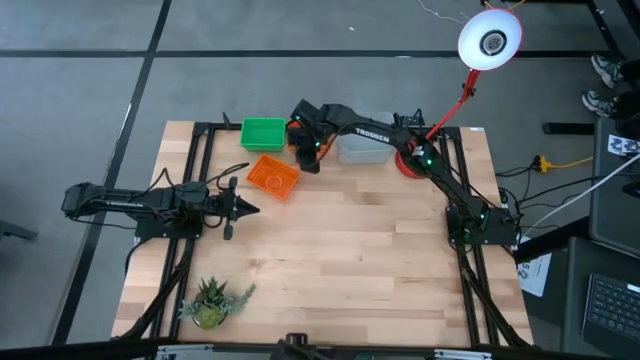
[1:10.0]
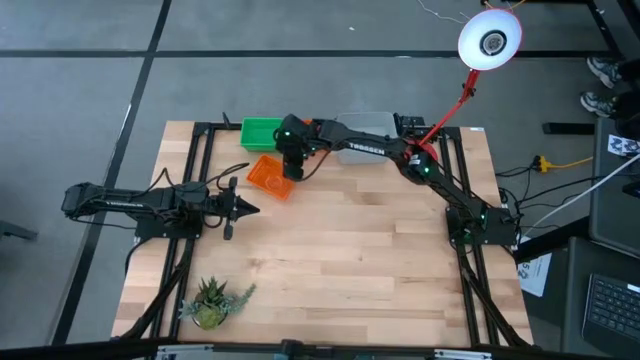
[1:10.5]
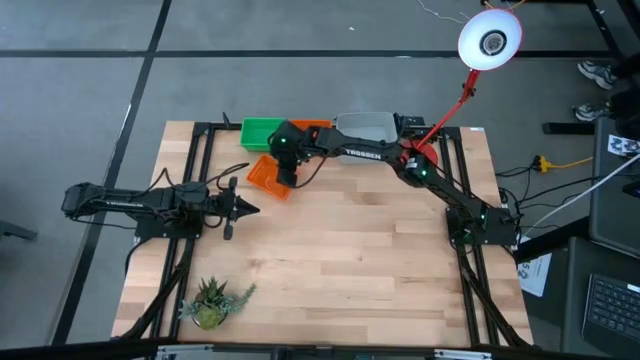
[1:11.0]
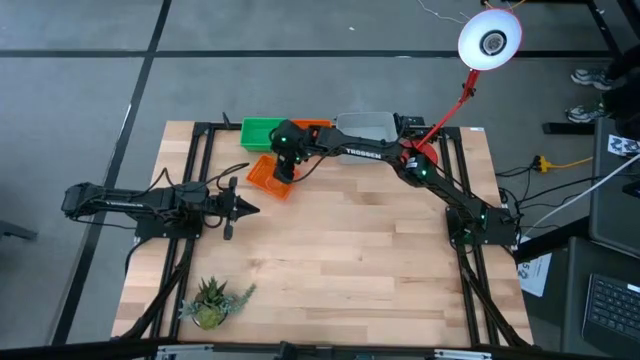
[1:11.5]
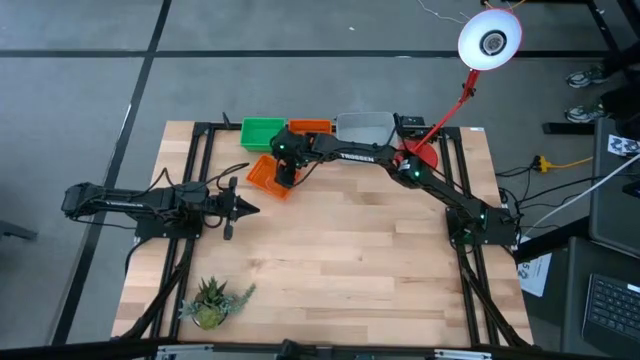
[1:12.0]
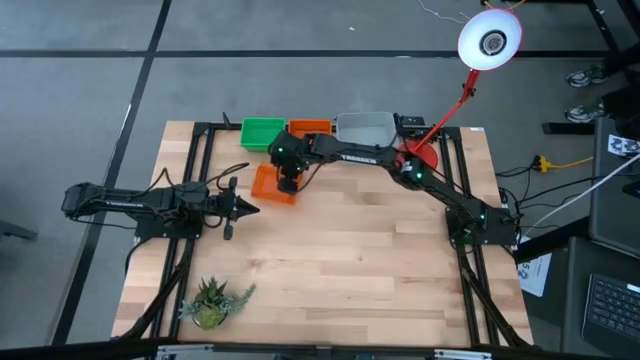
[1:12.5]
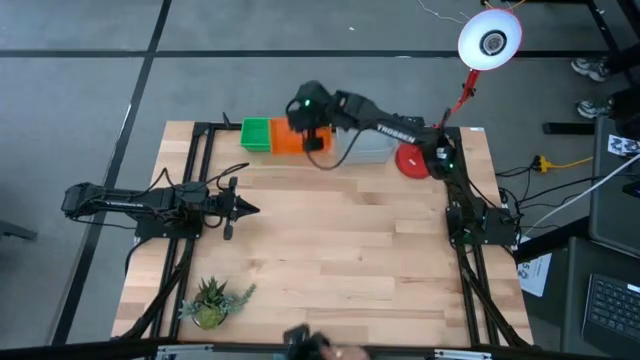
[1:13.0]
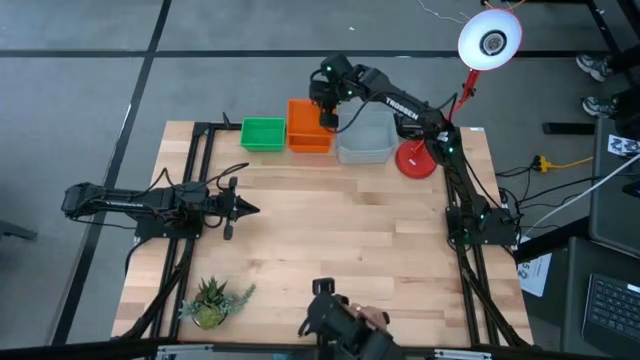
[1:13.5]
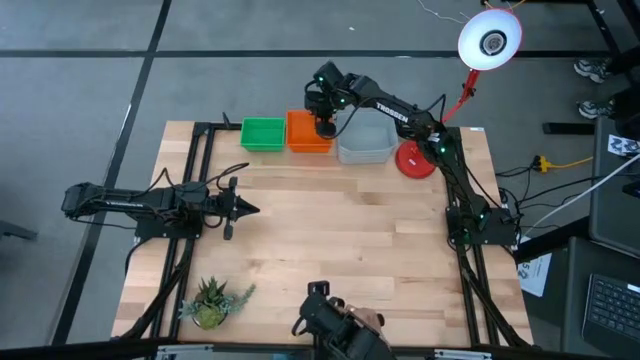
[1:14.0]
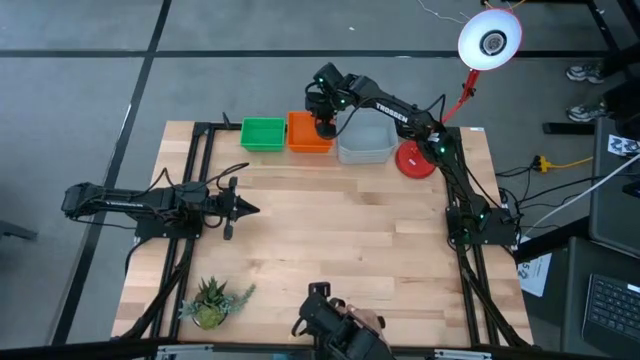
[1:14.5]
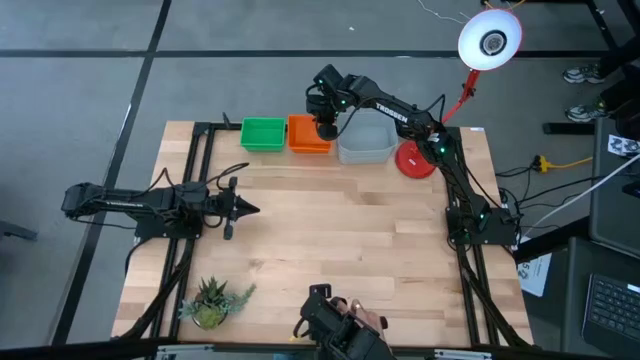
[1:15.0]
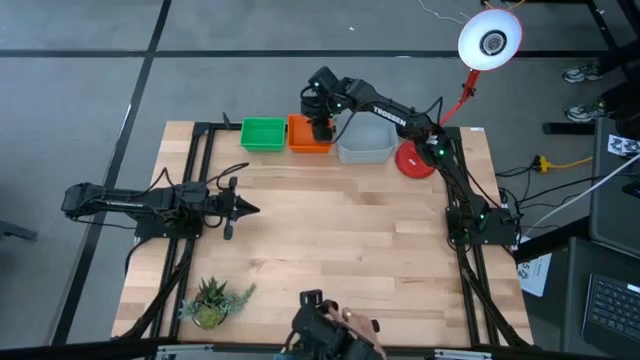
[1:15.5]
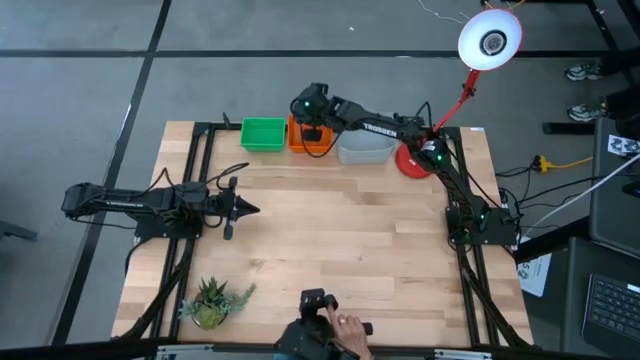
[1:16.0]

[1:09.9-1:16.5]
Stack the bottom orange bin on top of the top orange bin

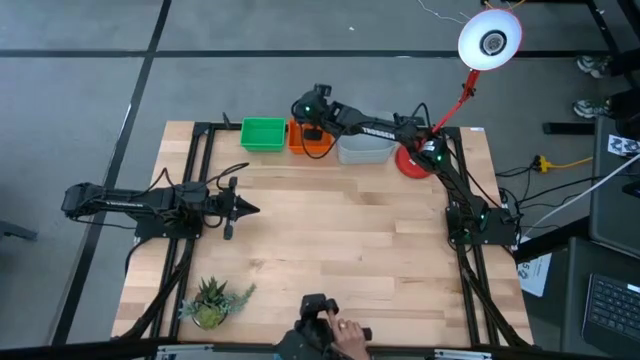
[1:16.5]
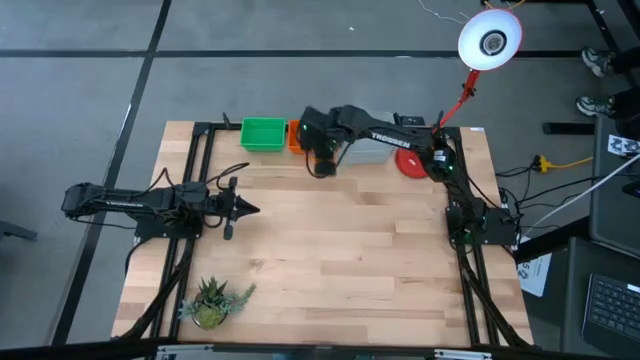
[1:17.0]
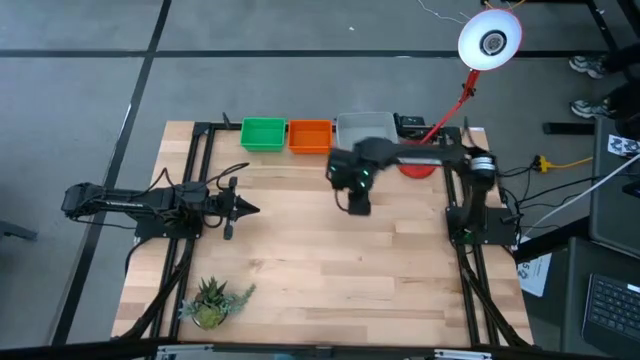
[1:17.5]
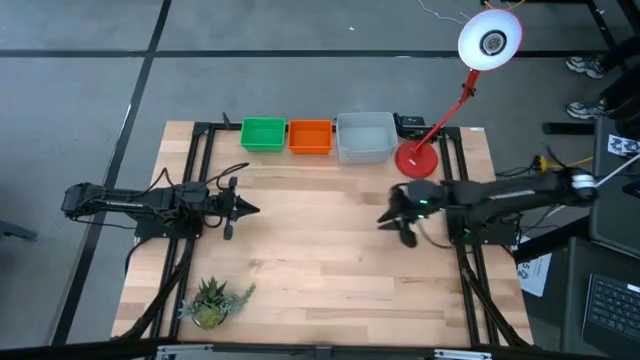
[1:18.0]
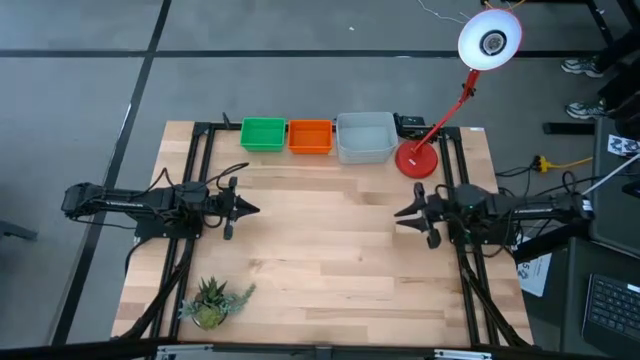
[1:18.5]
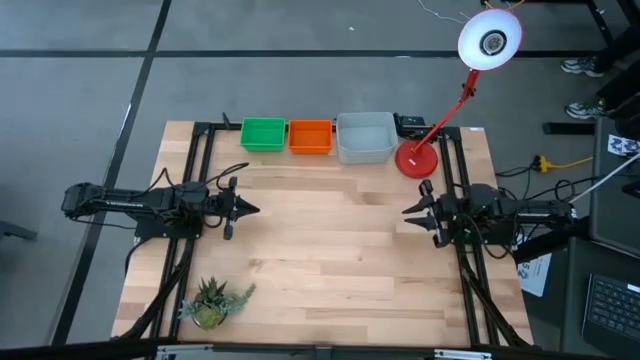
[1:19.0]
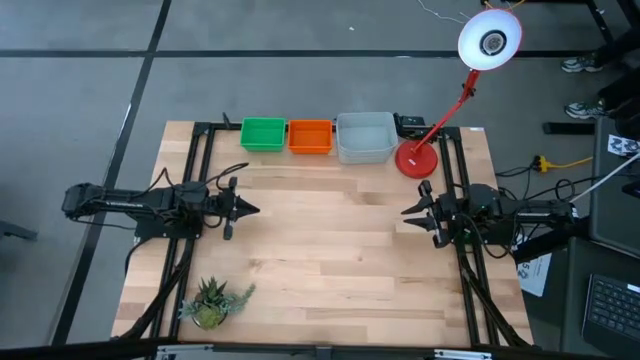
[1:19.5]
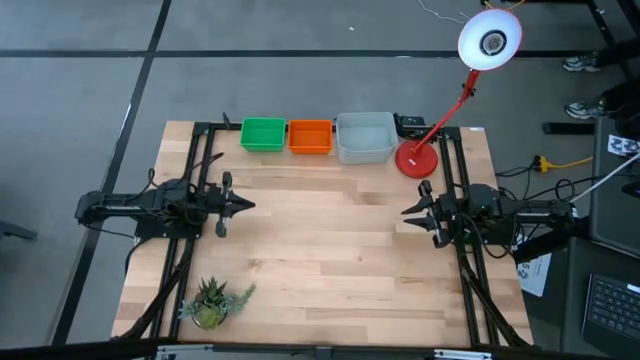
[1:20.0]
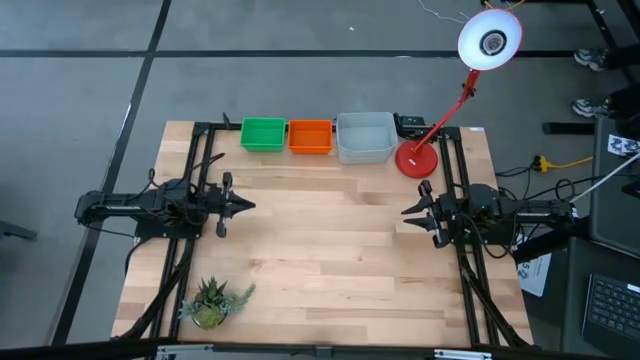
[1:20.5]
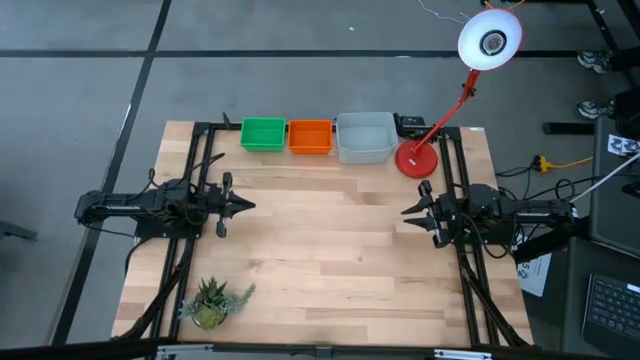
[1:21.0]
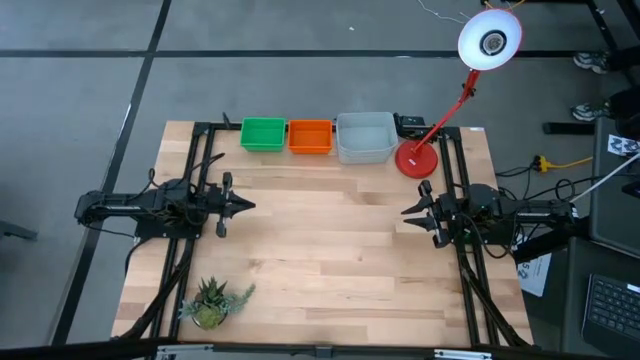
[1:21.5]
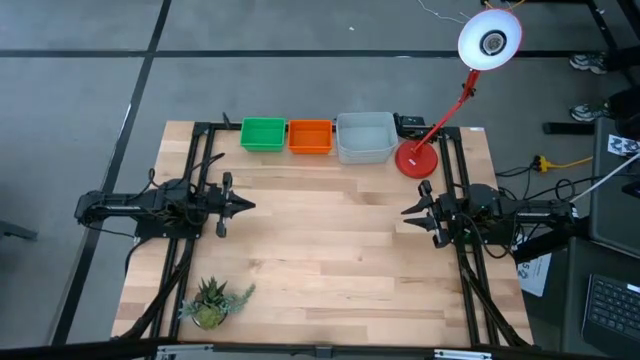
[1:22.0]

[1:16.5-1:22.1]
Return to Home Position

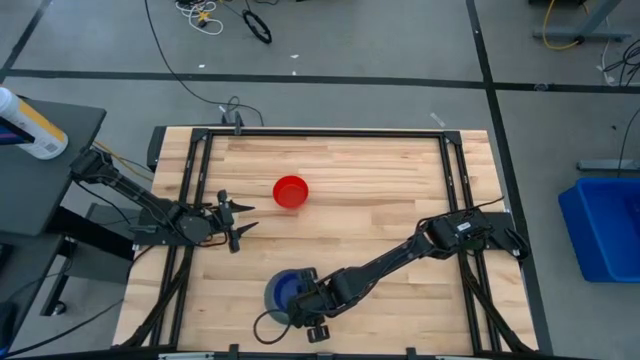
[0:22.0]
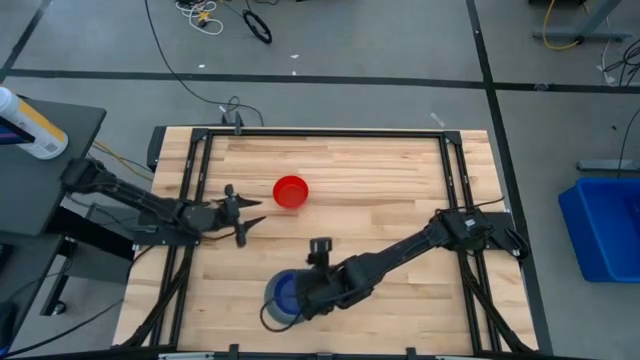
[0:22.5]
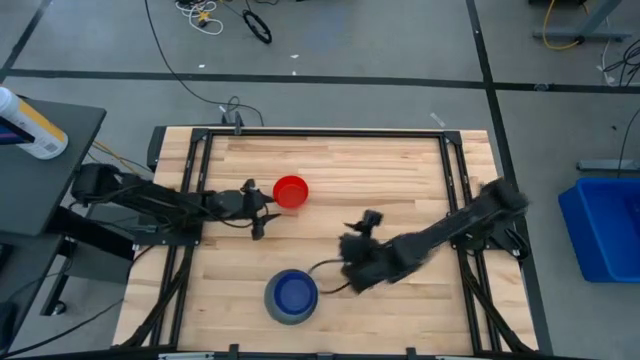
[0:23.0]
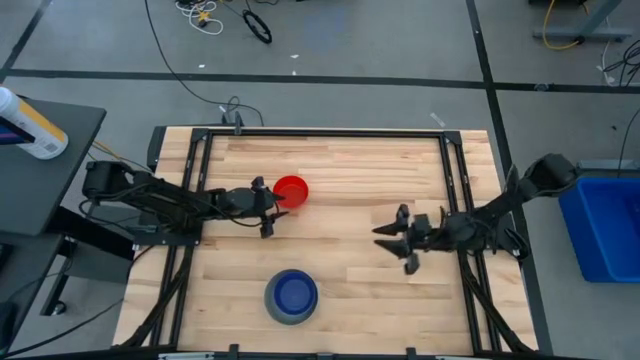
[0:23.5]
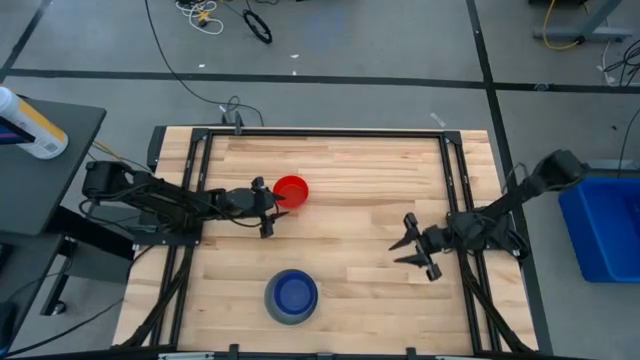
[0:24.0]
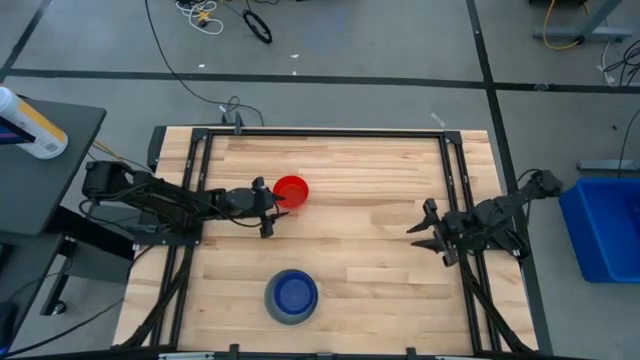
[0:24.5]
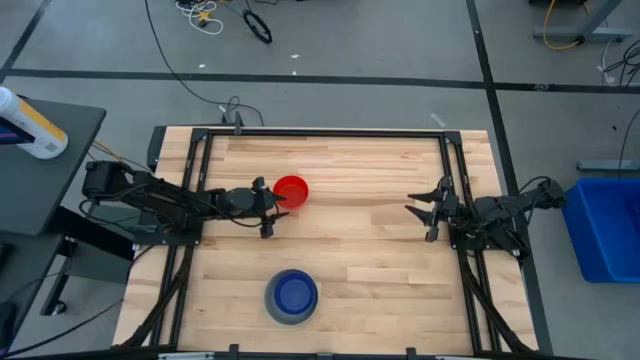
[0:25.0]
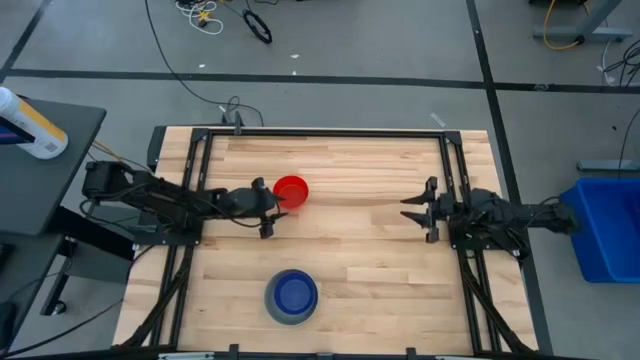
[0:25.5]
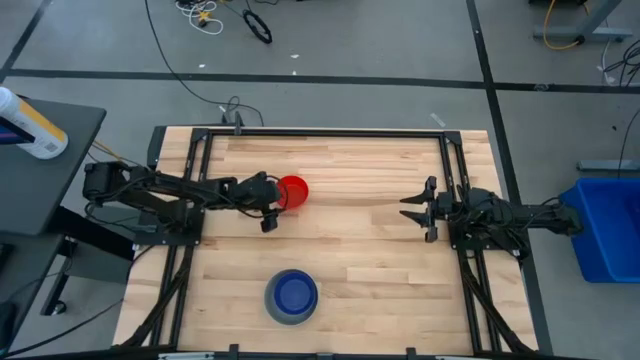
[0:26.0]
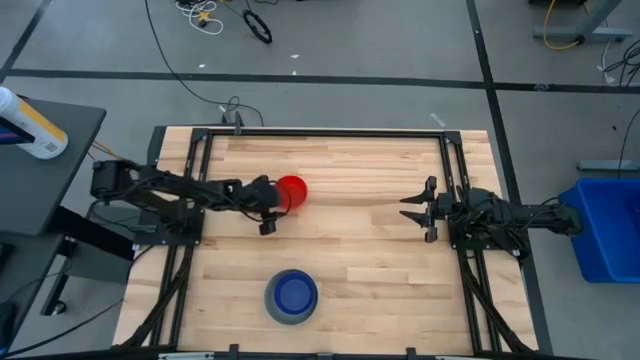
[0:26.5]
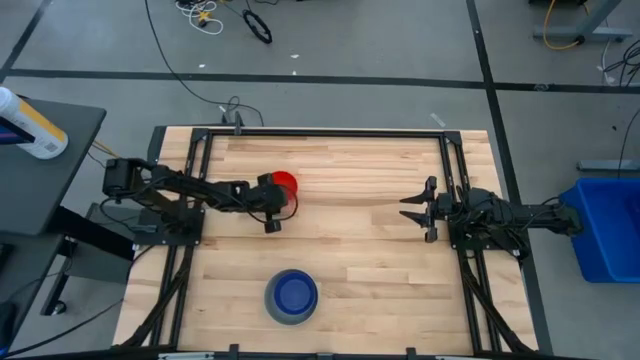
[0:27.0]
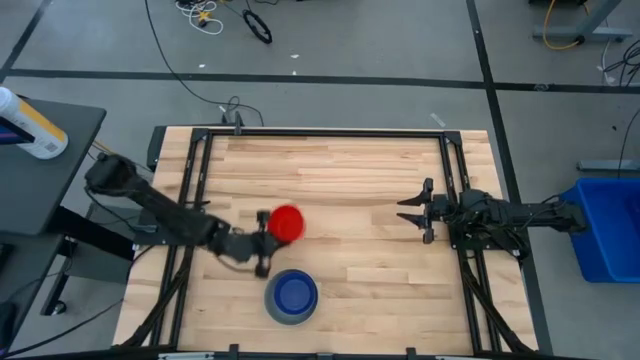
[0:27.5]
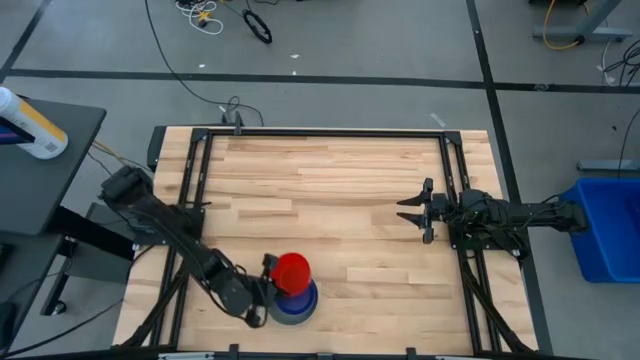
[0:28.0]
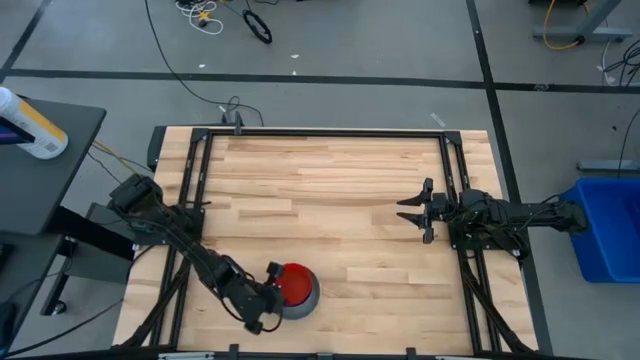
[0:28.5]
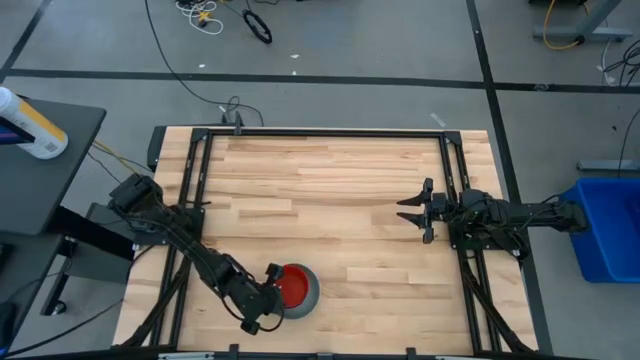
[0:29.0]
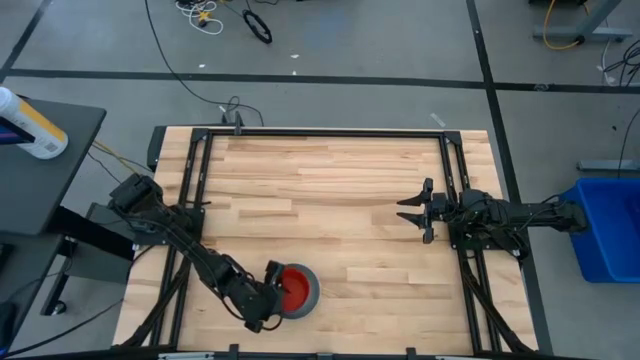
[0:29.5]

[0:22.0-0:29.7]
Stack the red bowl on top of the purple bowl
